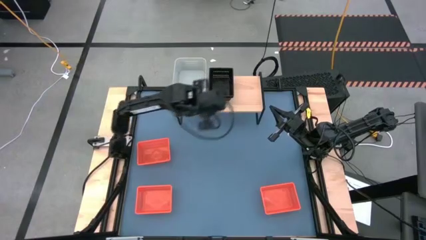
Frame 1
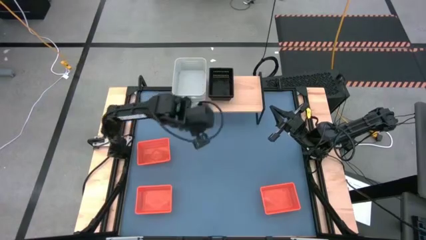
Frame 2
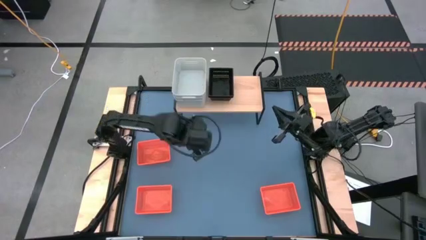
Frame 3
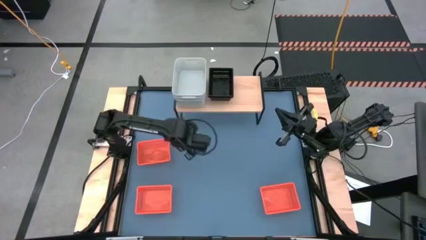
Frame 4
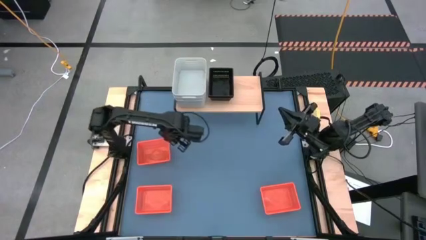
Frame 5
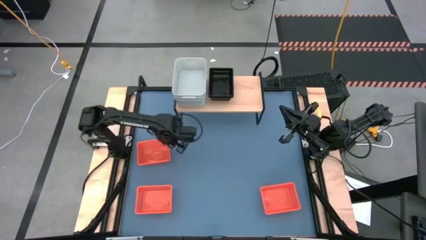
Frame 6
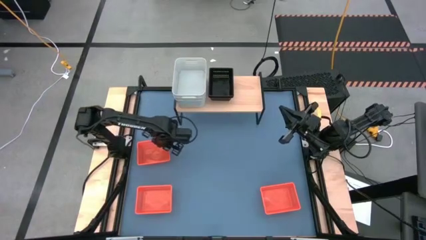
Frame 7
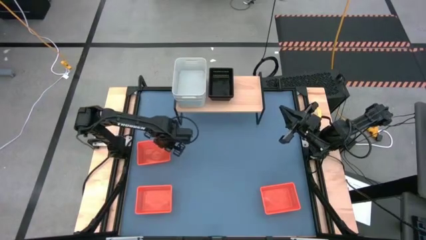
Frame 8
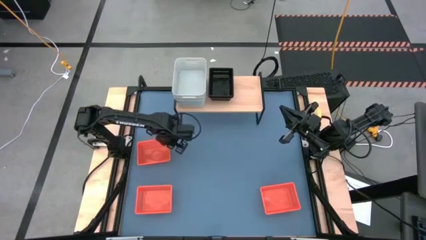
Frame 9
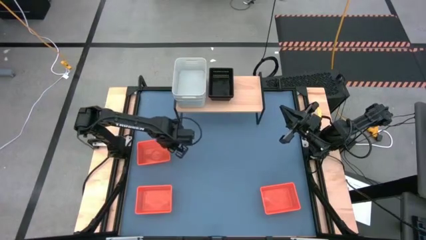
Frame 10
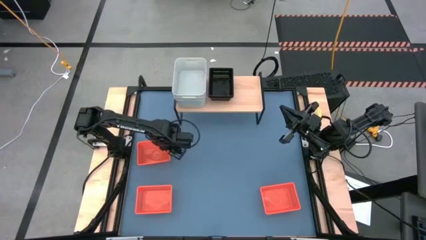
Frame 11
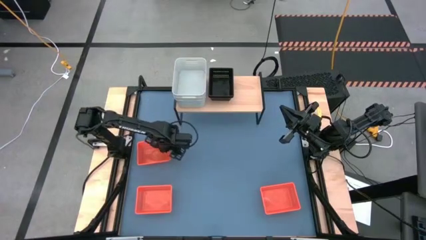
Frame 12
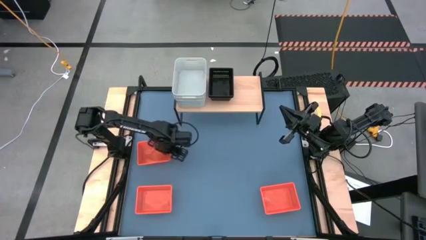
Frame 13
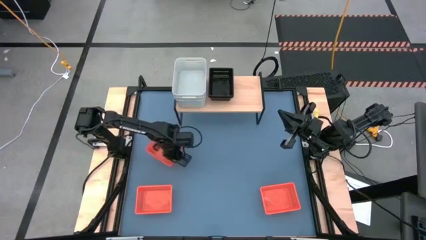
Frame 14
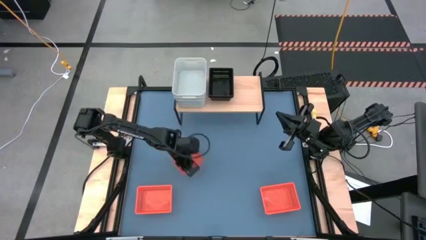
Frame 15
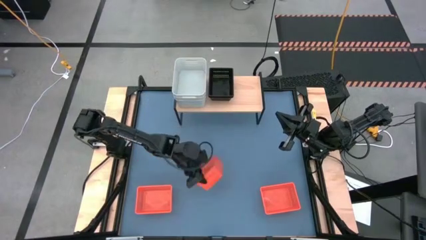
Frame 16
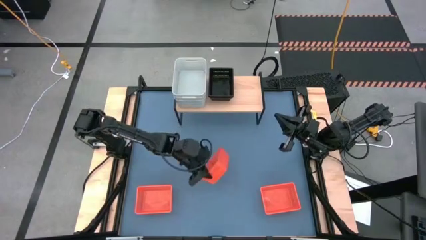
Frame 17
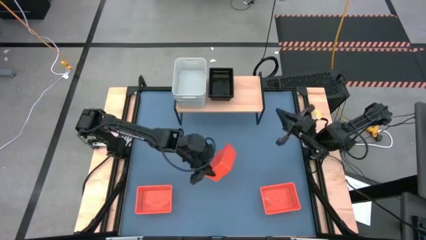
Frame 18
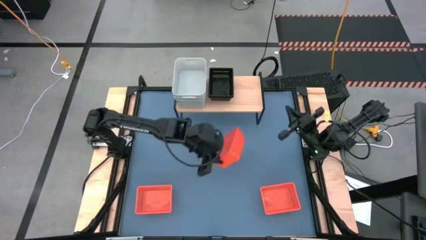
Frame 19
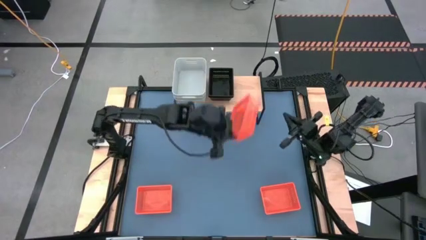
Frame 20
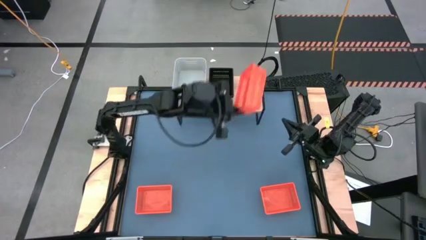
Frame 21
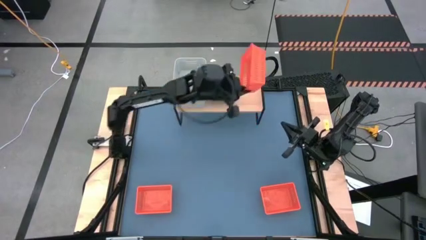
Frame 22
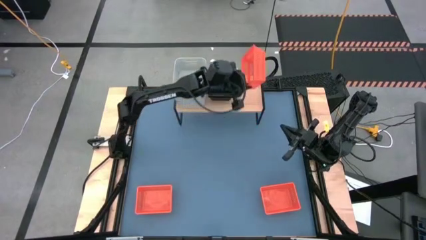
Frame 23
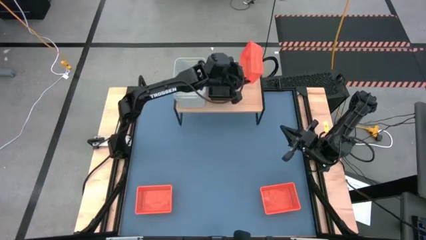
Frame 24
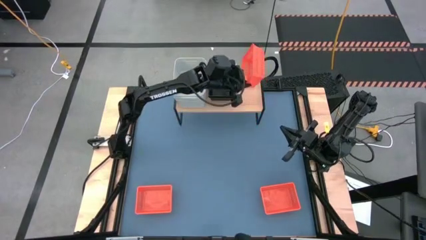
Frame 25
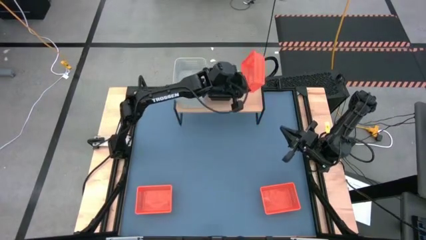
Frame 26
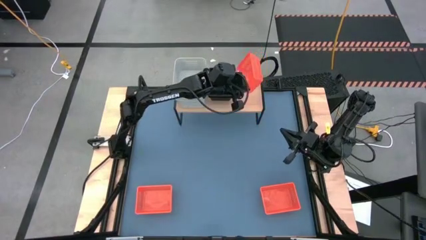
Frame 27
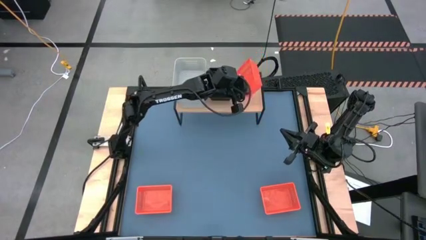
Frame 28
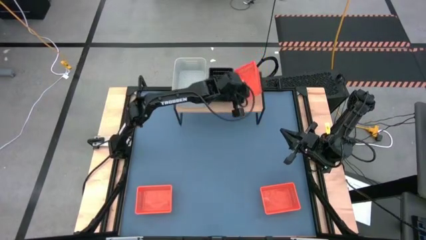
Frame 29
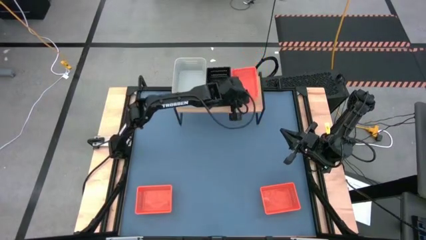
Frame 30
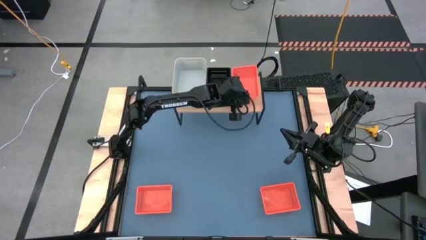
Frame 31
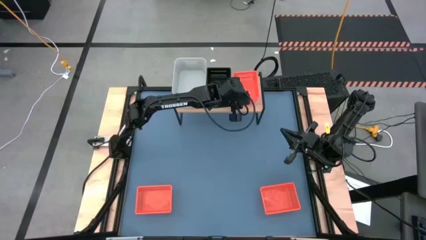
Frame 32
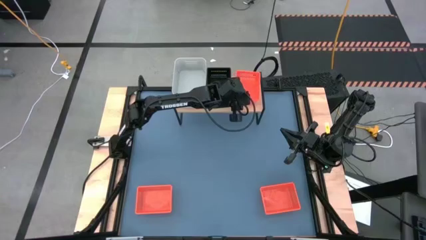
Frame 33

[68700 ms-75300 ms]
Task: Stack baskets on shelf by color
Put the top orange bin on the shelf

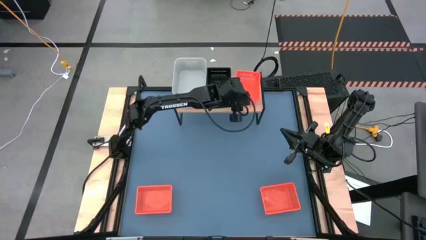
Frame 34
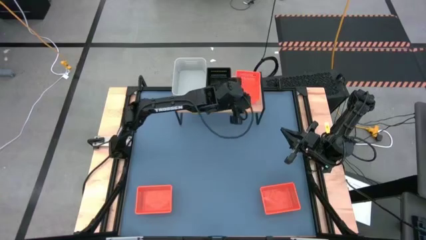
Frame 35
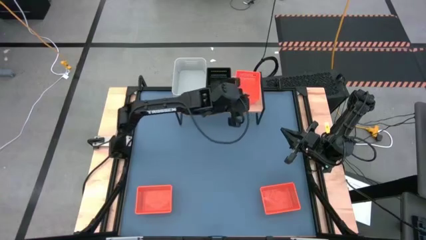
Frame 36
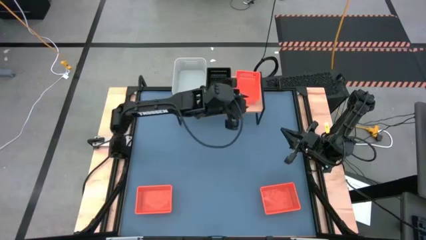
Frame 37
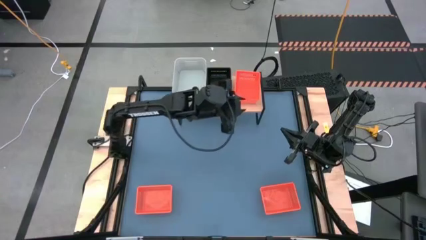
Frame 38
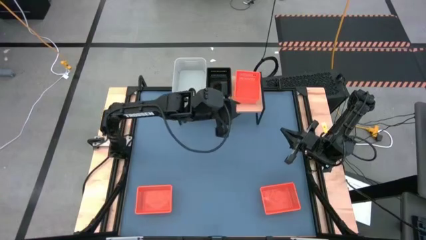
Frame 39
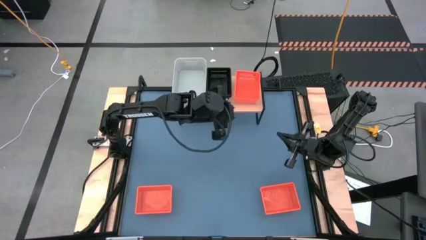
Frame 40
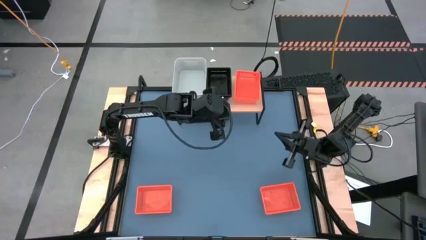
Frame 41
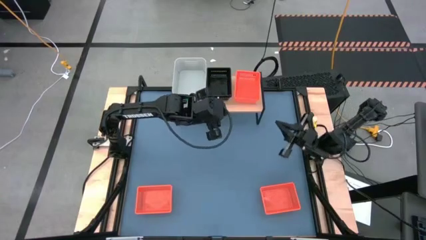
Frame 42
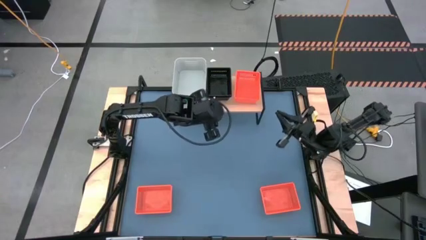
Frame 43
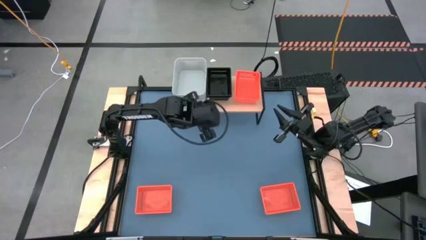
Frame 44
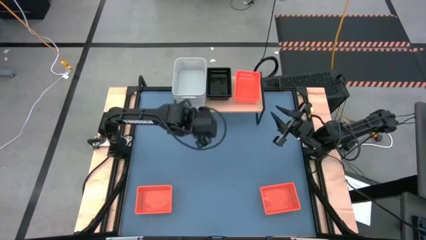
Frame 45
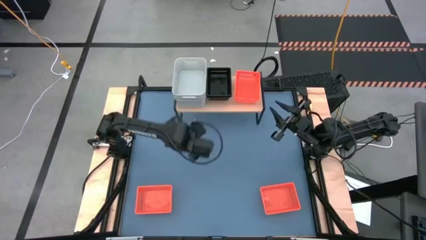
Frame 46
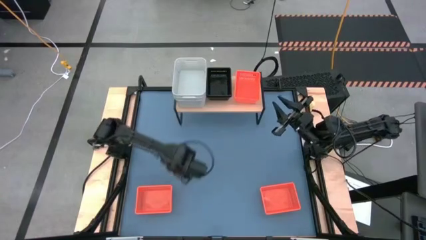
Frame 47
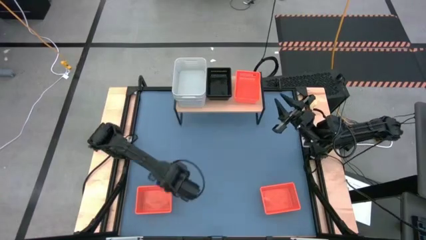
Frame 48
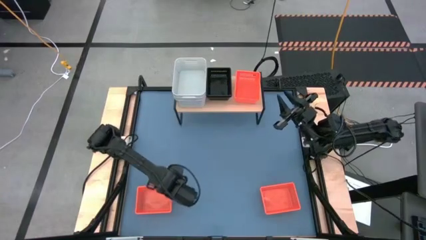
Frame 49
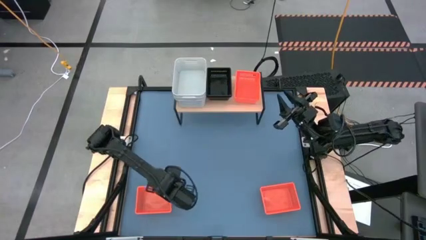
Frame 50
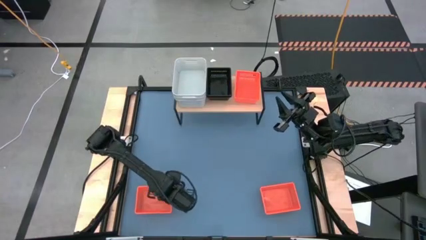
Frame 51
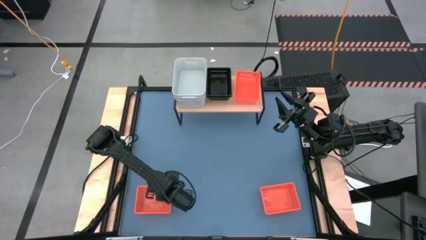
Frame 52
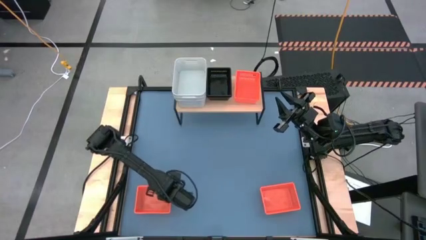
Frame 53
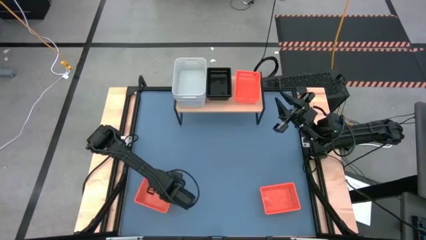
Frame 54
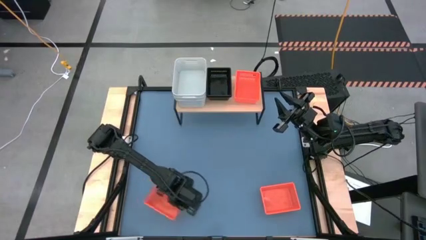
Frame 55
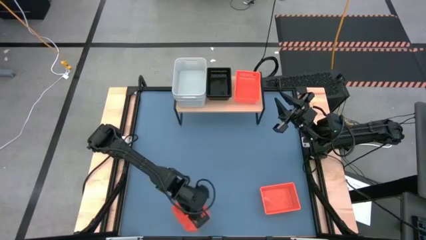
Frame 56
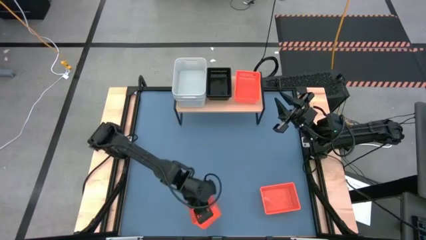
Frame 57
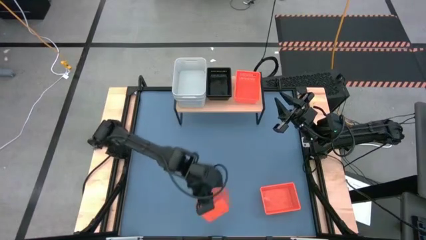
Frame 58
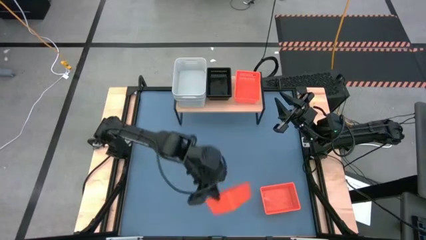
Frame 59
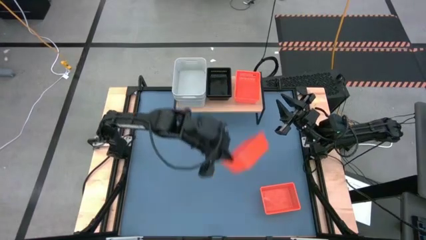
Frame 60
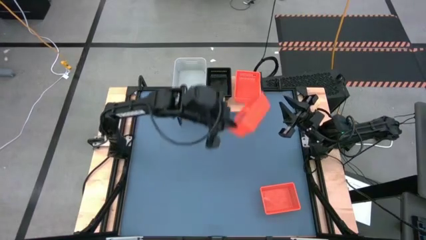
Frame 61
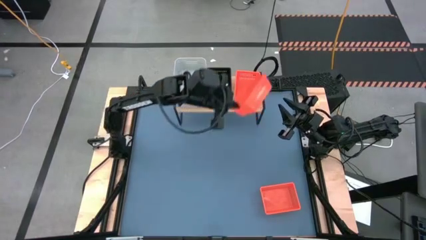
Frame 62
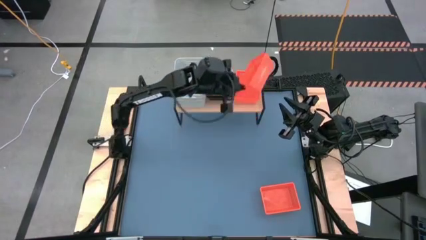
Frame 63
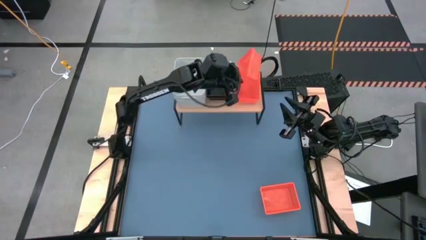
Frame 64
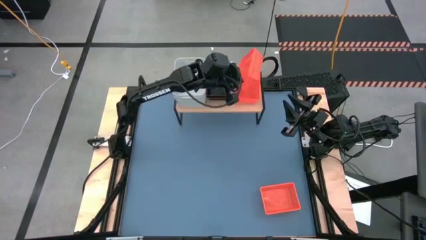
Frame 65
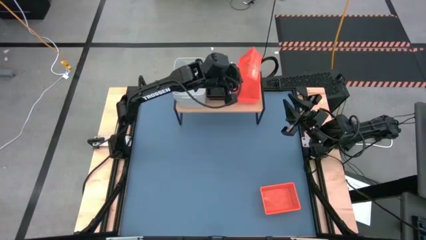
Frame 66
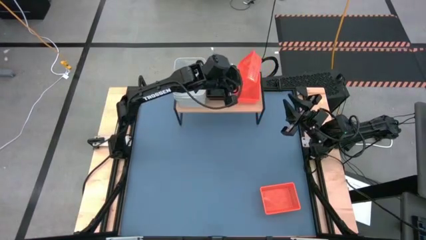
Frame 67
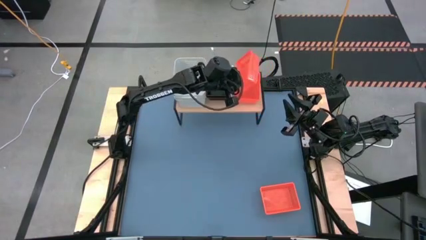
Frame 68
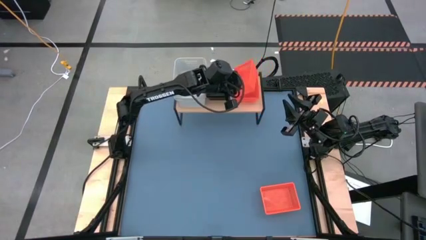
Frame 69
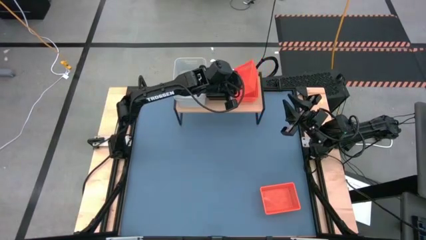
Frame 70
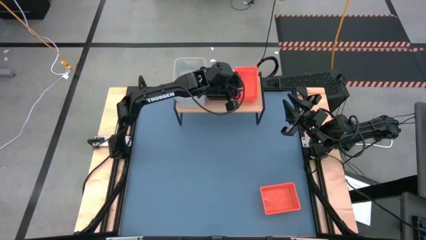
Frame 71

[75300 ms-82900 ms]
Stack the left orange bin on top of the other orange bin on the shelf

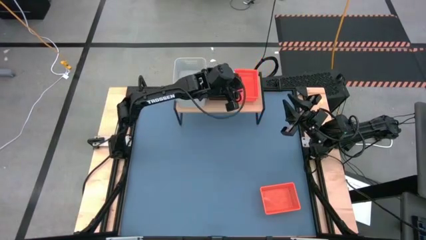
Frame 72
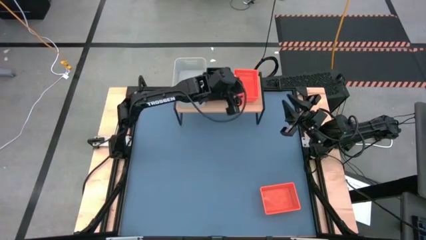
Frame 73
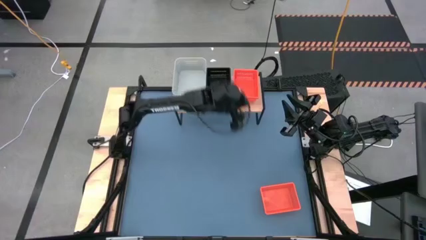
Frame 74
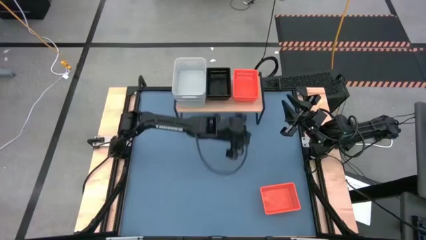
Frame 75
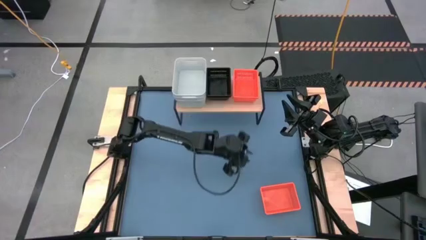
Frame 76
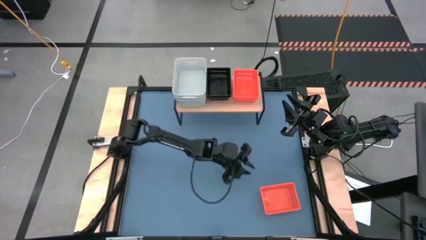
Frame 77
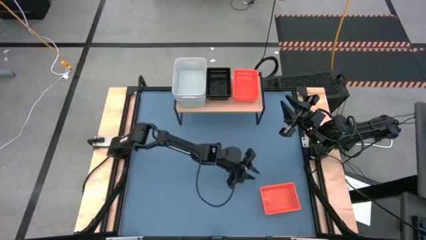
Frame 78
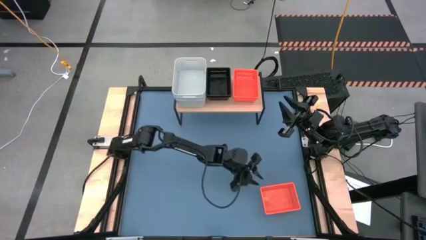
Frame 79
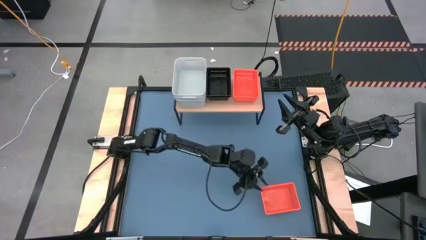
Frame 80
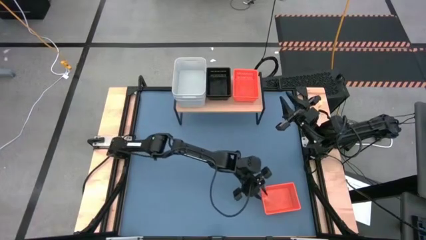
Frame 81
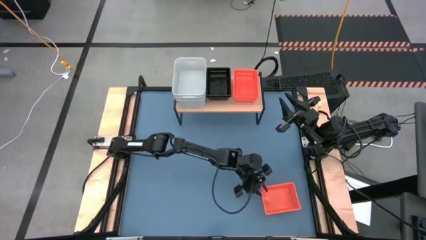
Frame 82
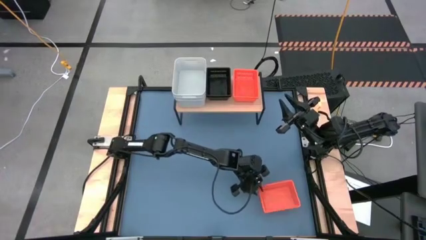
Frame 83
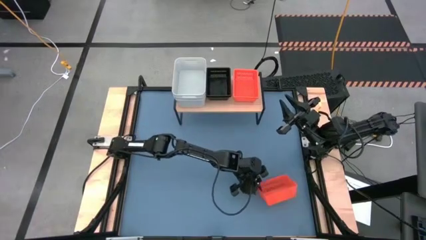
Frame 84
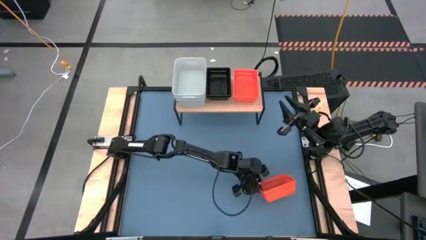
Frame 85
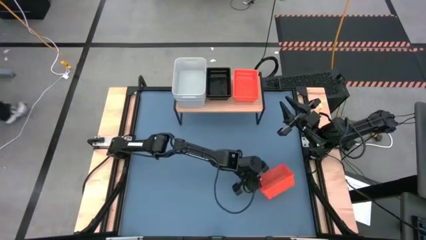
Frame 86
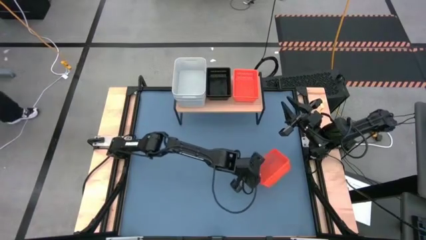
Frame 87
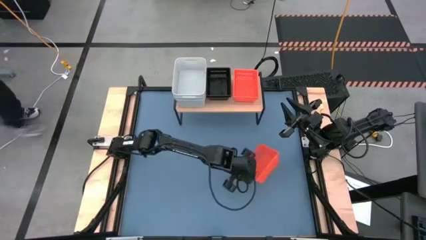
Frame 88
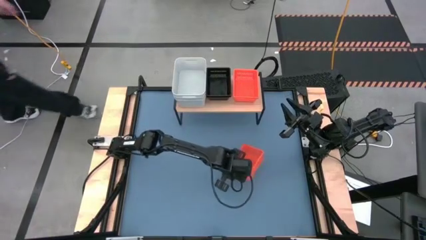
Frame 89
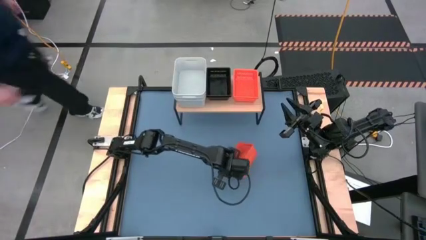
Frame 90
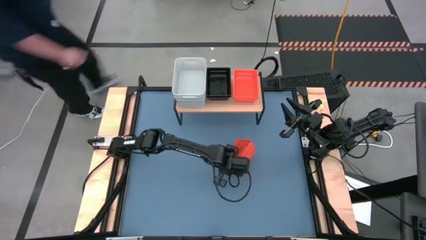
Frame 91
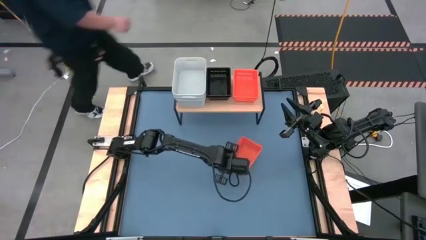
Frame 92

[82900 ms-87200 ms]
Stack the orange bin on top of the other orange bins on the shelf
